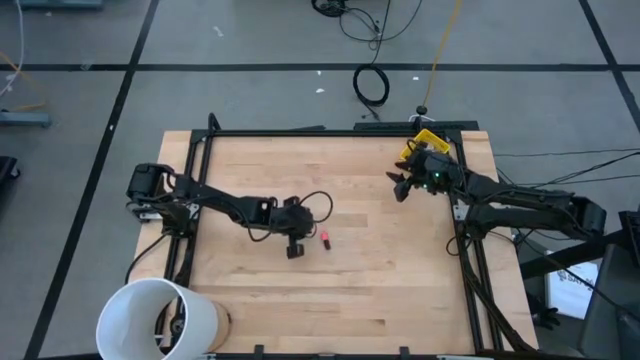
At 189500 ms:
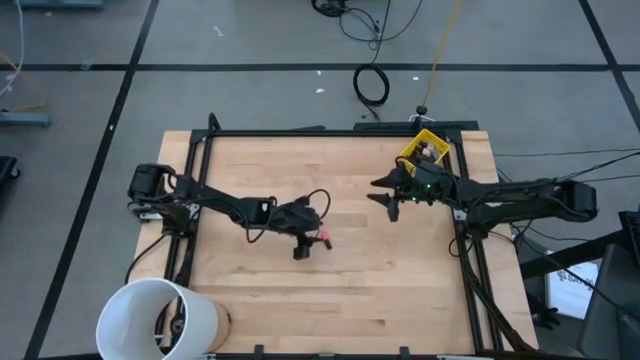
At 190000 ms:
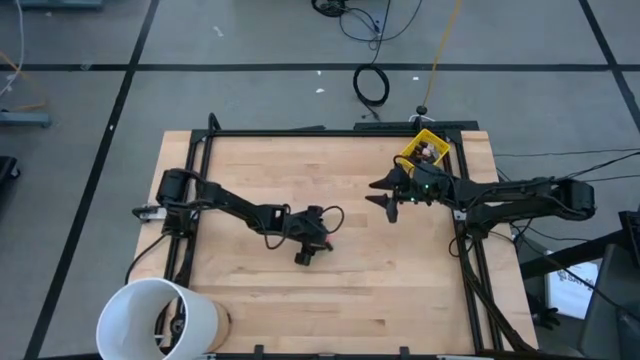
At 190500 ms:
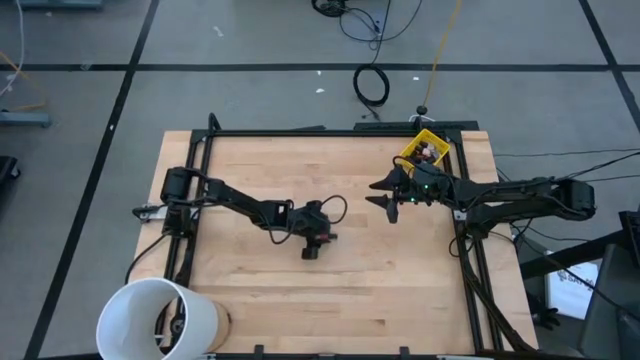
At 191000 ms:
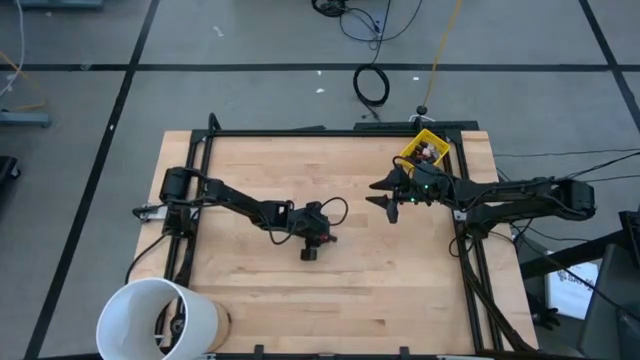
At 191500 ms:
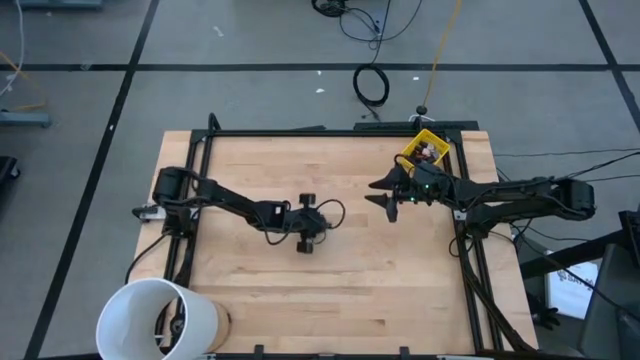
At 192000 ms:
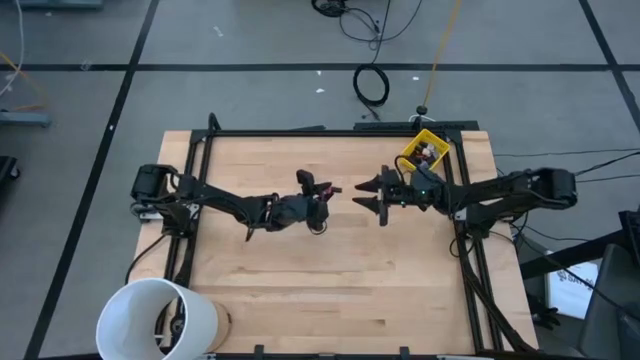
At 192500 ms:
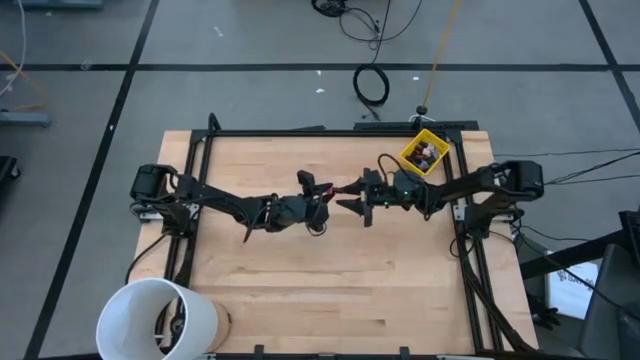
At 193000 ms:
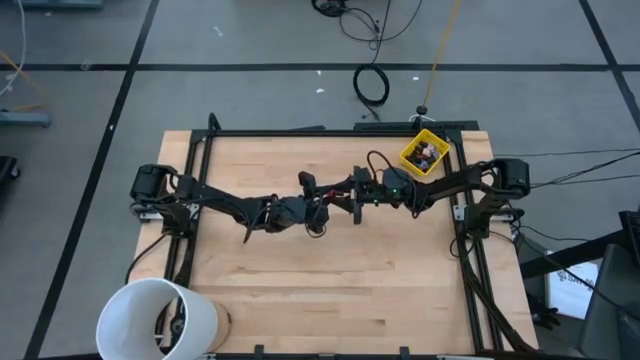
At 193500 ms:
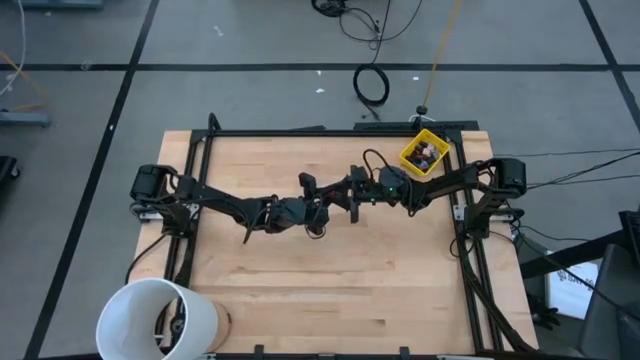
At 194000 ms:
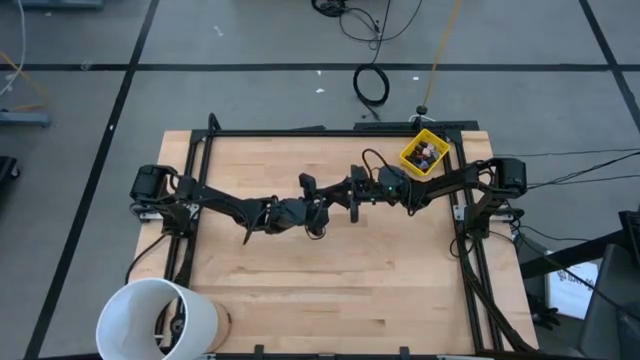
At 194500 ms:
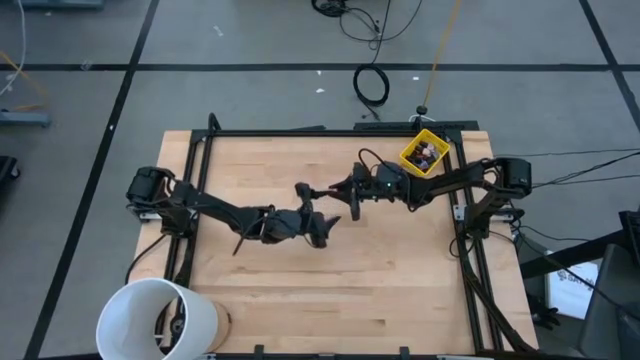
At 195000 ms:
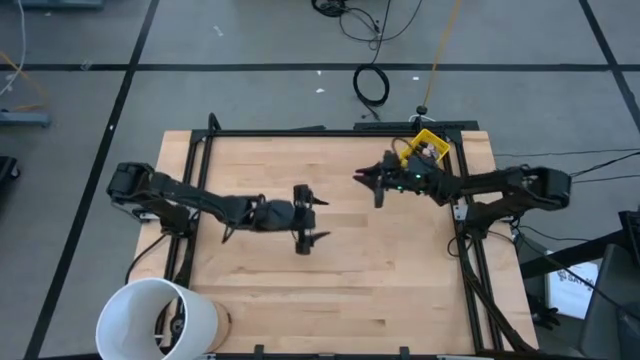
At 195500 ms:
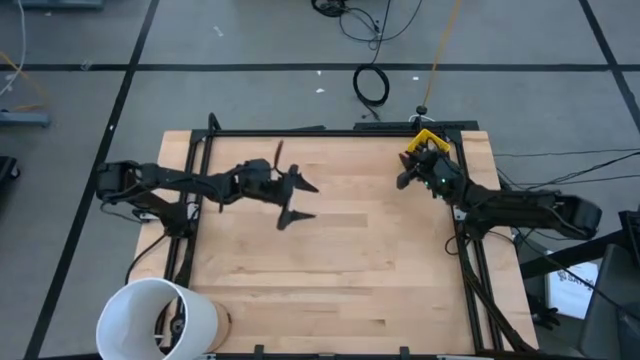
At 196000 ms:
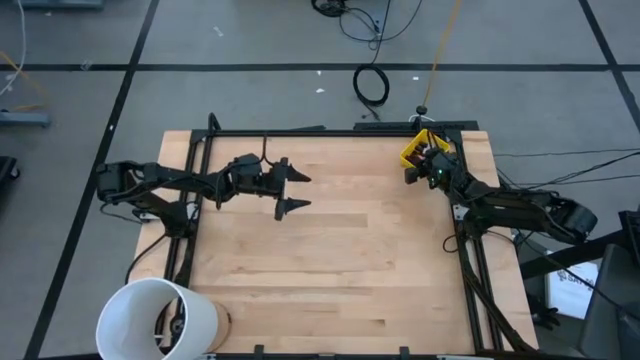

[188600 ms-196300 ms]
Task: Pick & Place Nail Polish
Put the pink nail polish bottle into the yellow bin

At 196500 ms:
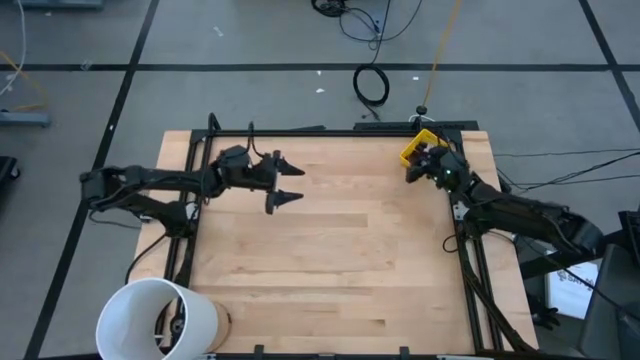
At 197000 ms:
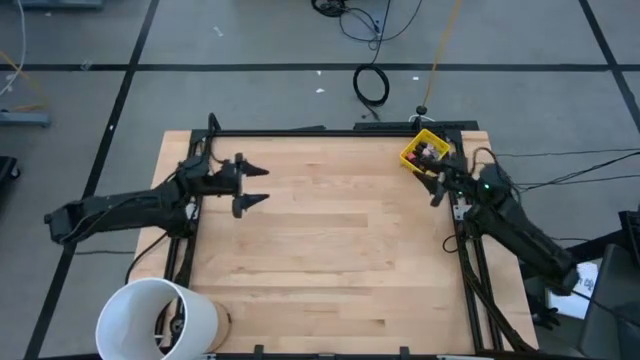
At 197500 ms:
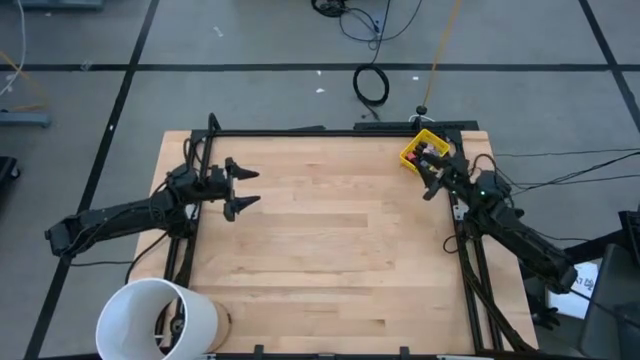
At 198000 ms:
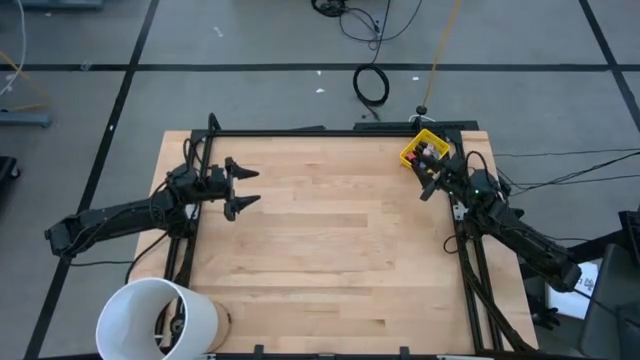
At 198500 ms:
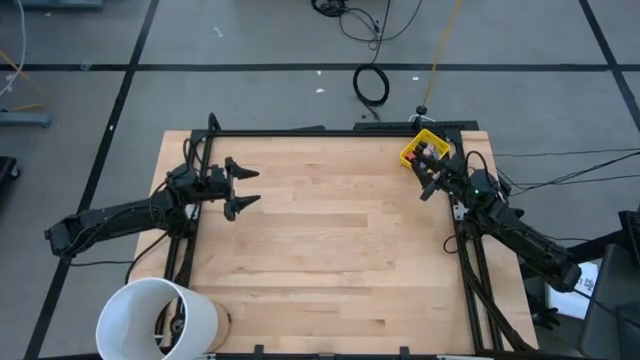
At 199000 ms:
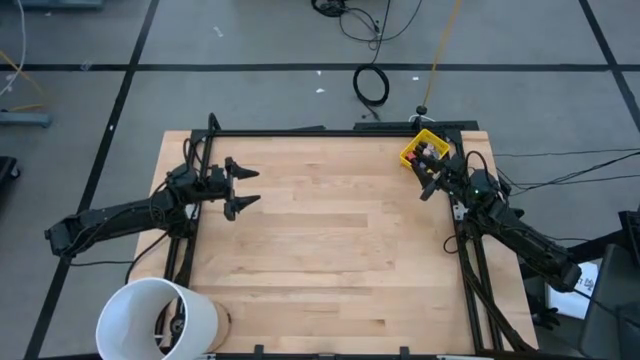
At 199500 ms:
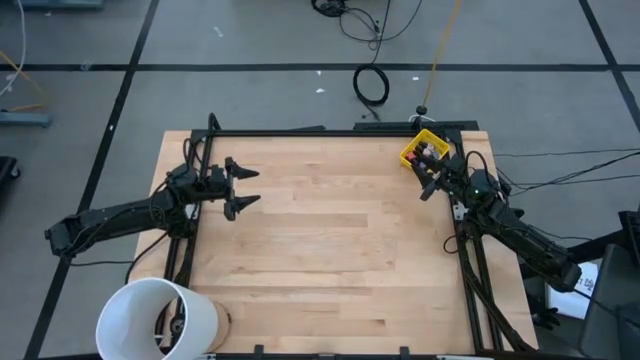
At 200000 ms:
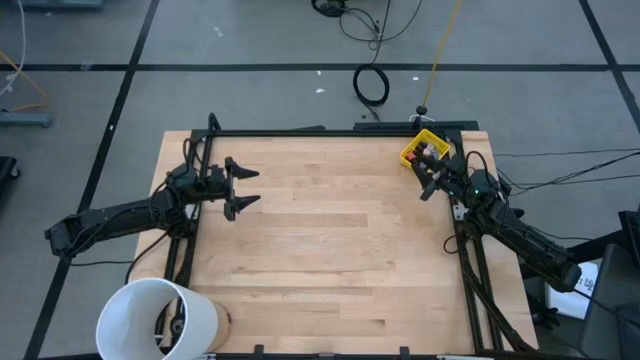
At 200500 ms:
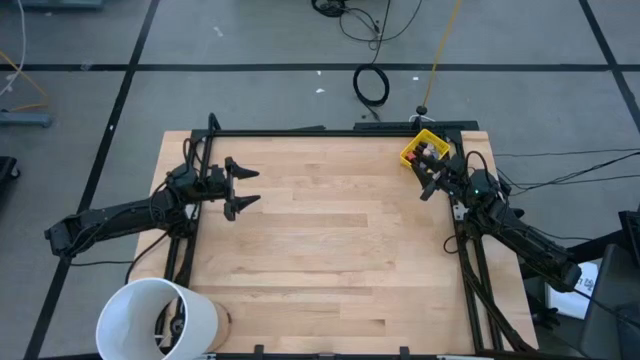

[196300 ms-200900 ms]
Return to Home Position

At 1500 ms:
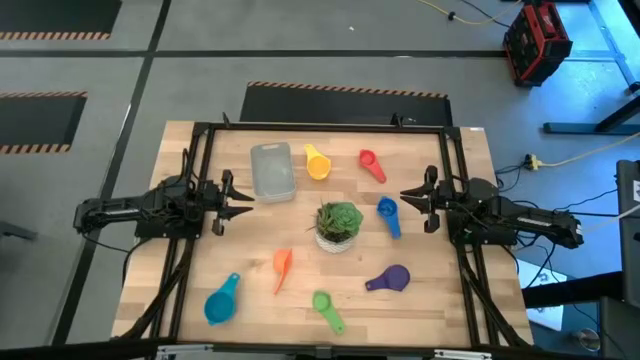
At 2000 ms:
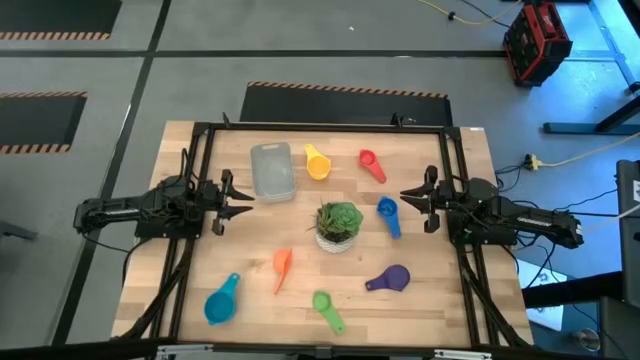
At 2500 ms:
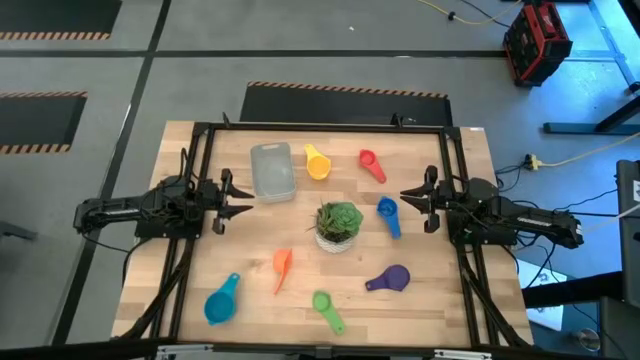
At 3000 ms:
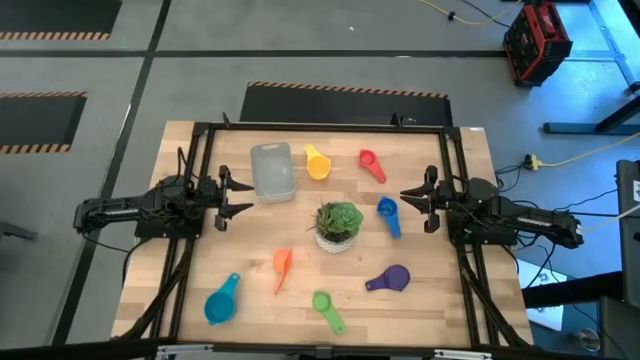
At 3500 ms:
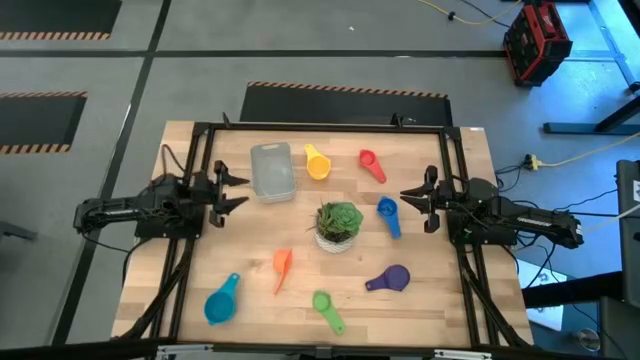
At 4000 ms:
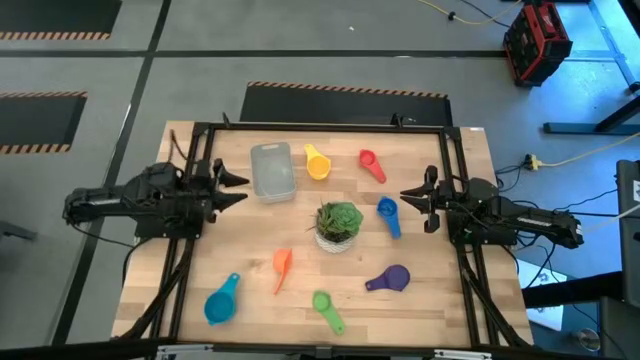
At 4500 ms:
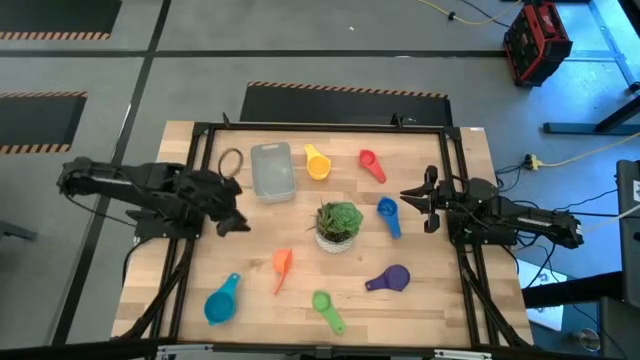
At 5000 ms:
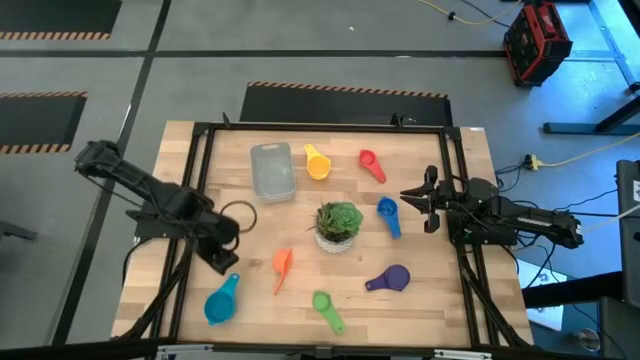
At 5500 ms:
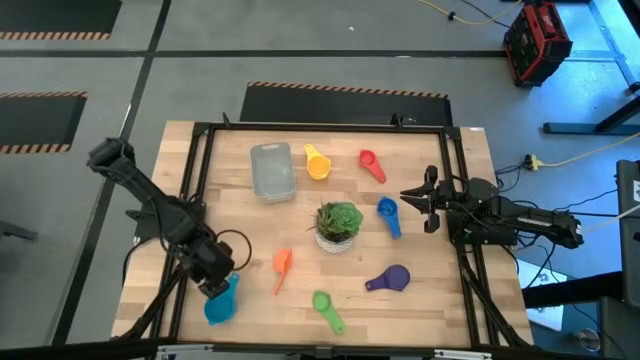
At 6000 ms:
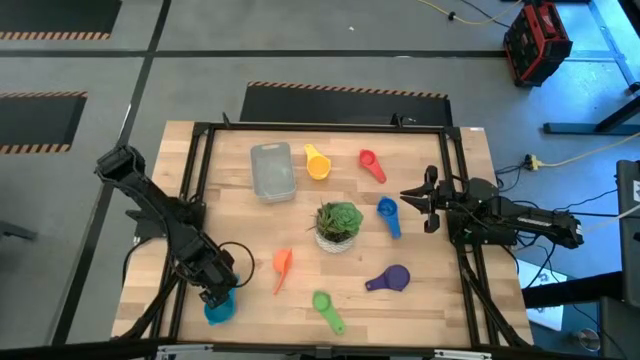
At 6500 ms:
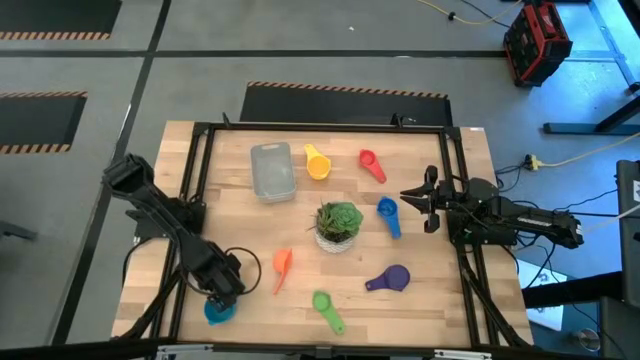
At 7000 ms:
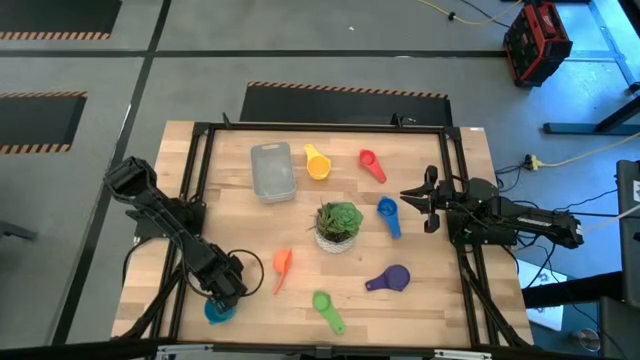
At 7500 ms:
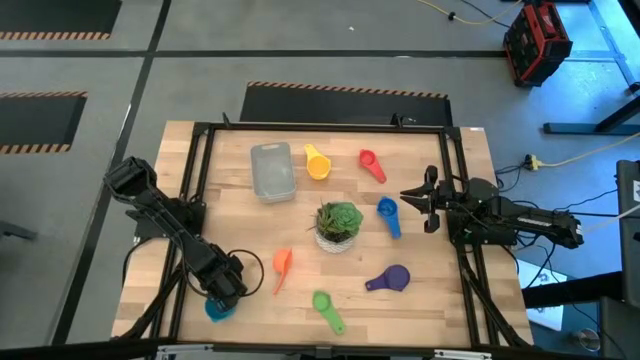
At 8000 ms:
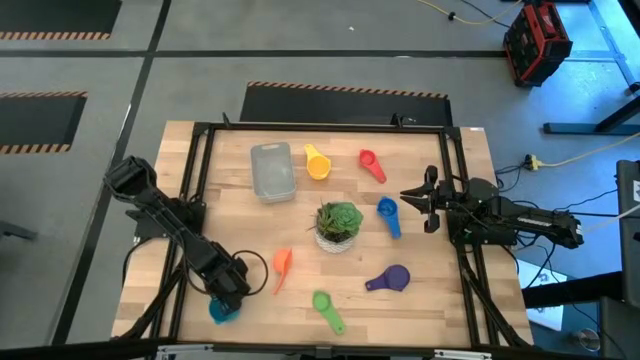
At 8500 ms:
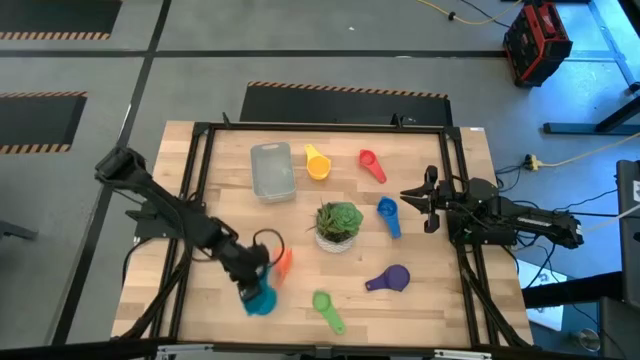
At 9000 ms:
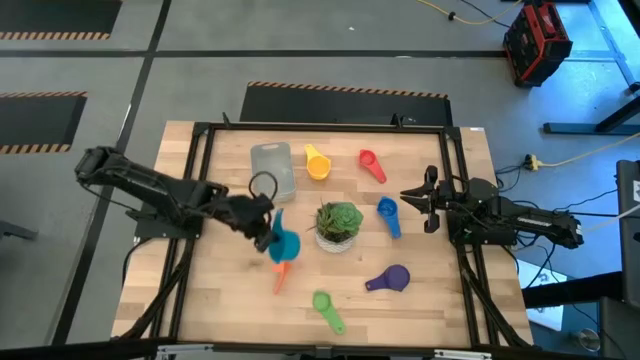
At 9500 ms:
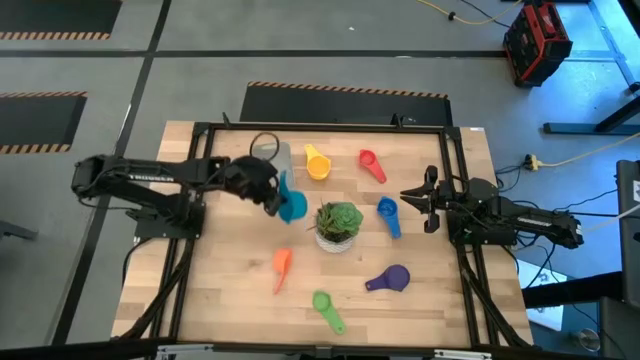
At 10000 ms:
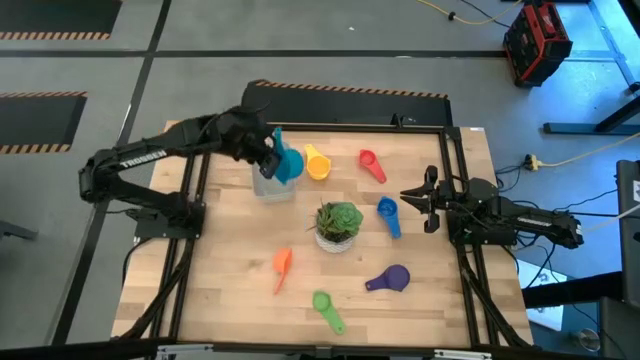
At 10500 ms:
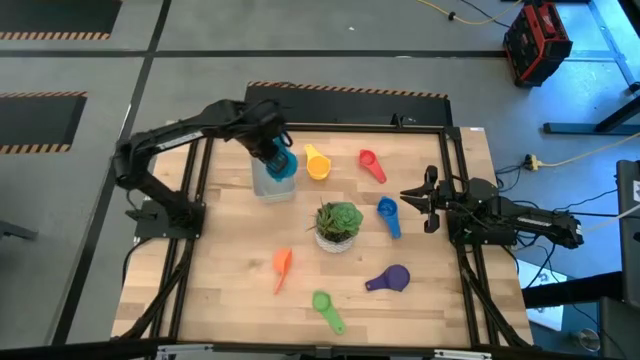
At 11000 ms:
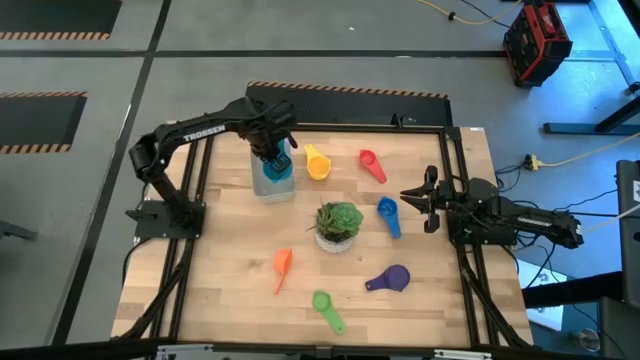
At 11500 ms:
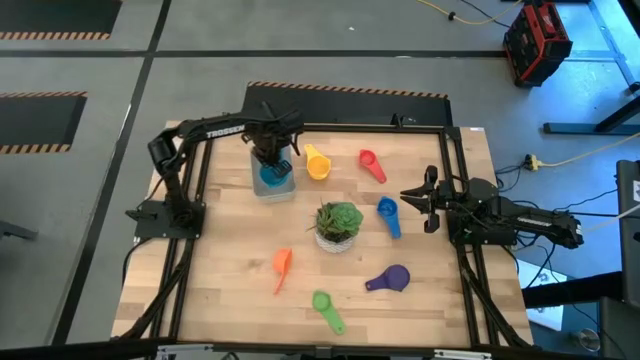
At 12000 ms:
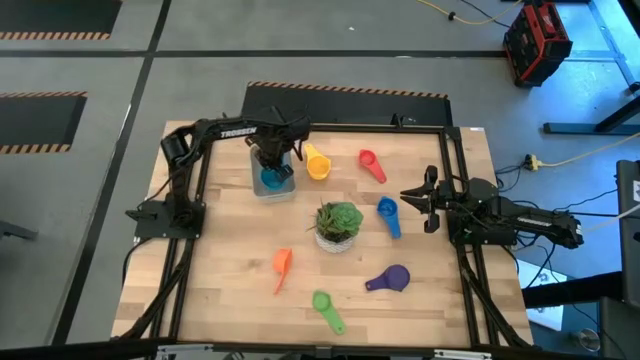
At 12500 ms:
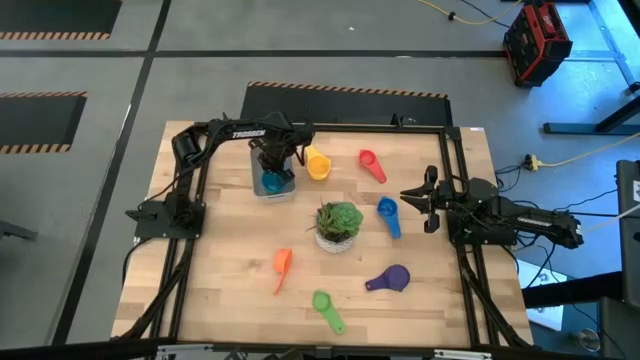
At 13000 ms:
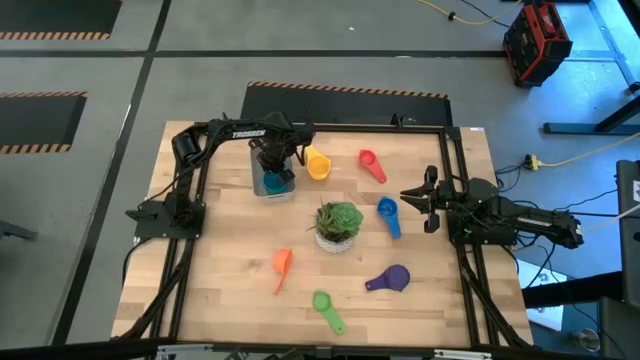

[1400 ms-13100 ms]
Task: Nest measuring cups in basket
Put the light blue measuring cup into the gray bin
